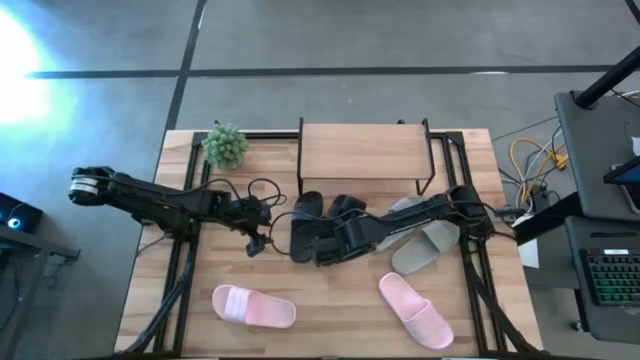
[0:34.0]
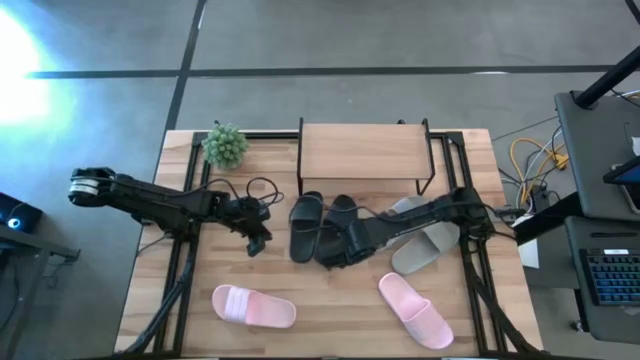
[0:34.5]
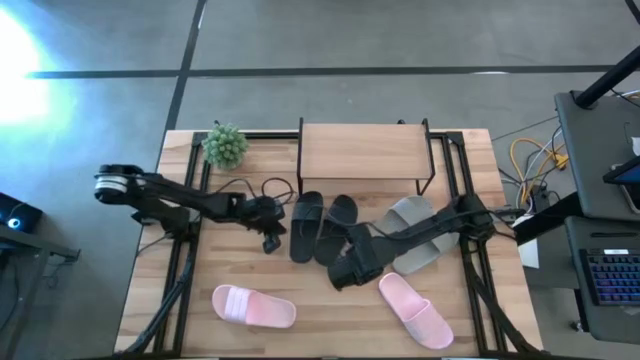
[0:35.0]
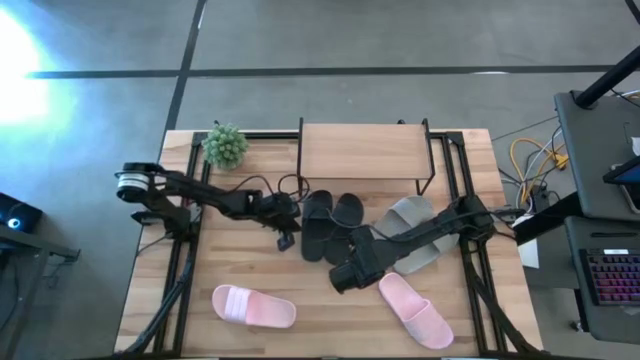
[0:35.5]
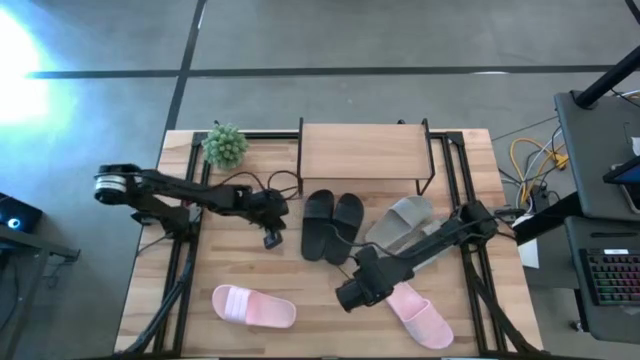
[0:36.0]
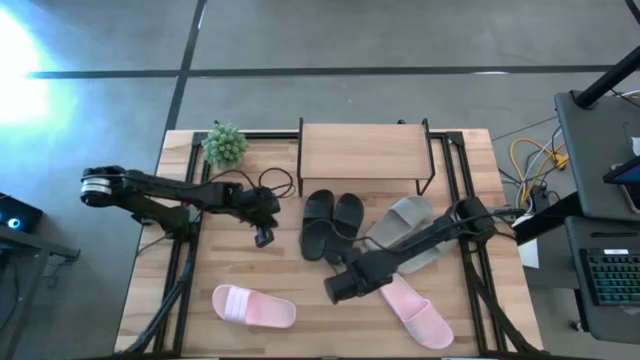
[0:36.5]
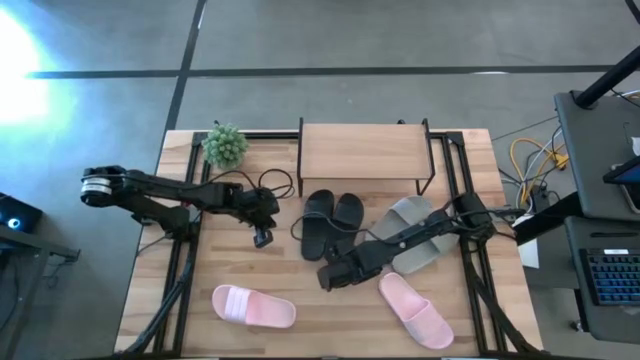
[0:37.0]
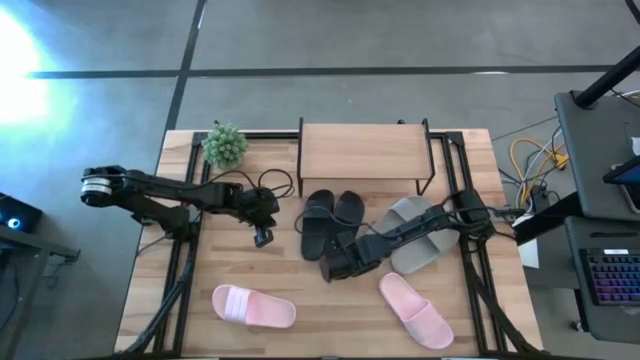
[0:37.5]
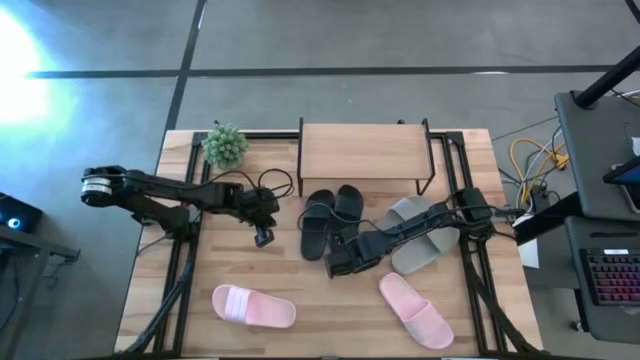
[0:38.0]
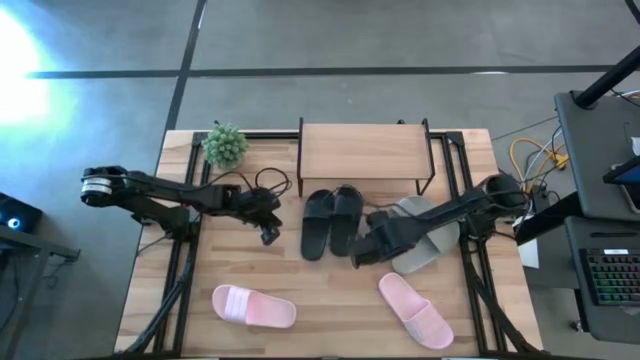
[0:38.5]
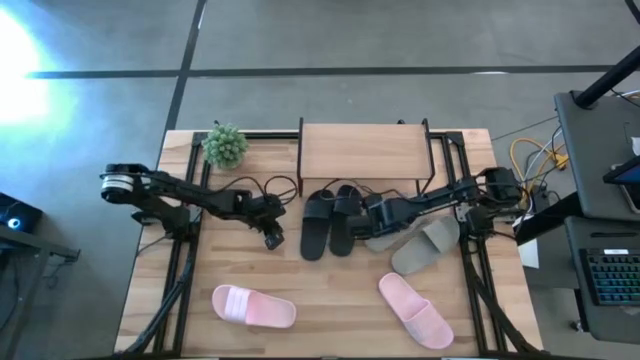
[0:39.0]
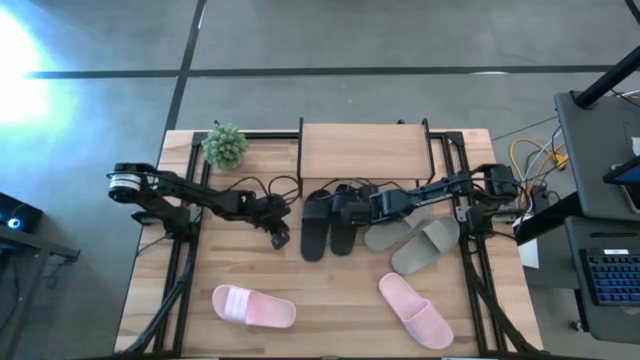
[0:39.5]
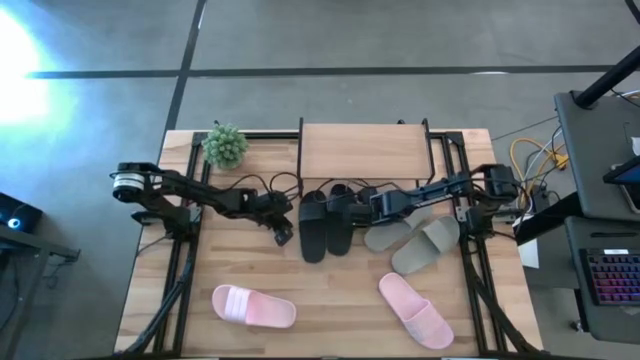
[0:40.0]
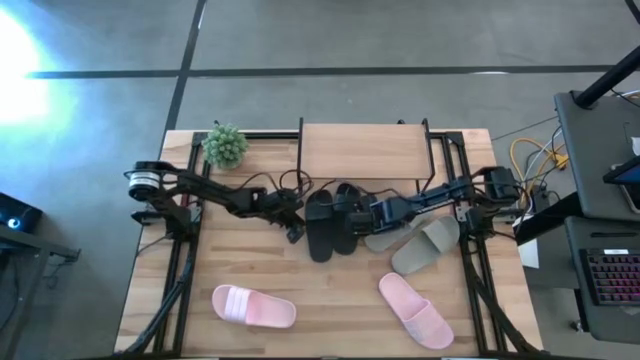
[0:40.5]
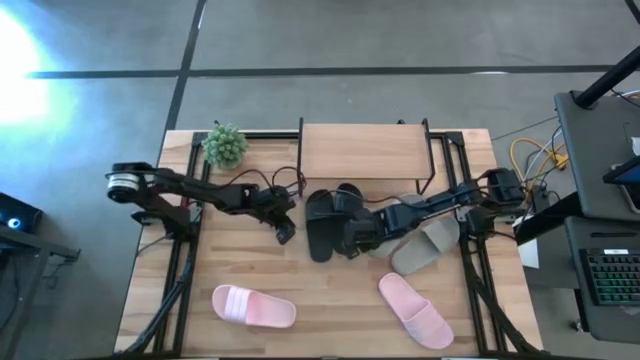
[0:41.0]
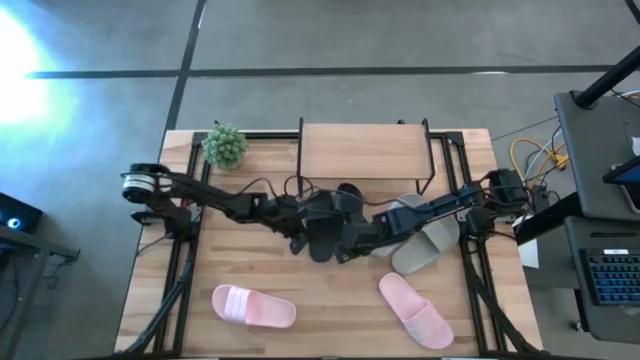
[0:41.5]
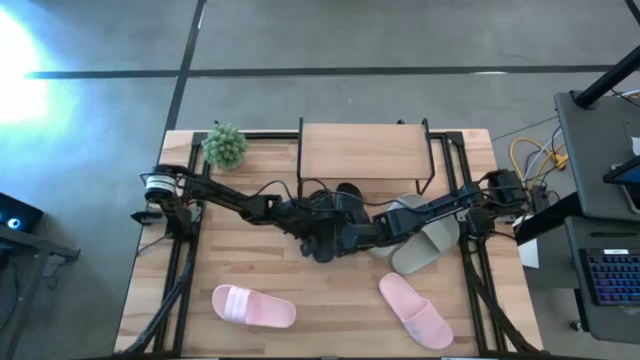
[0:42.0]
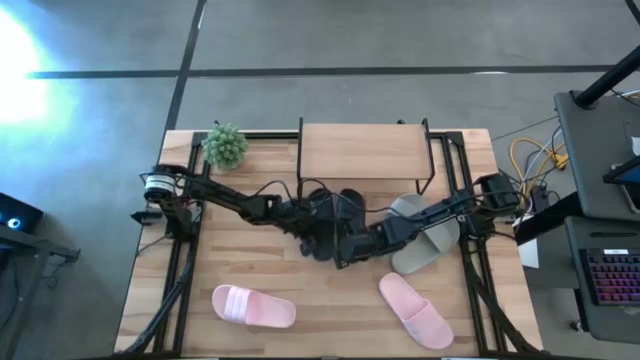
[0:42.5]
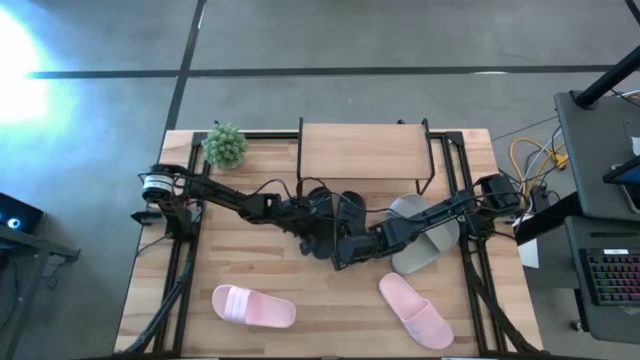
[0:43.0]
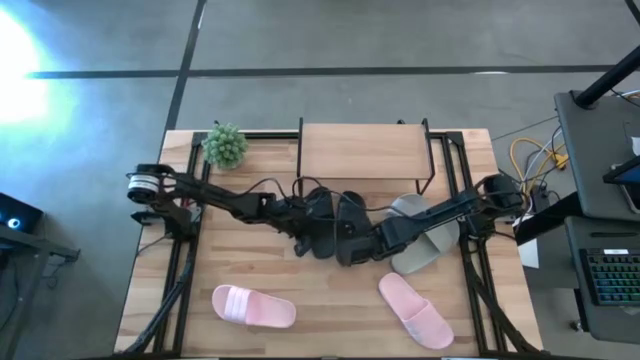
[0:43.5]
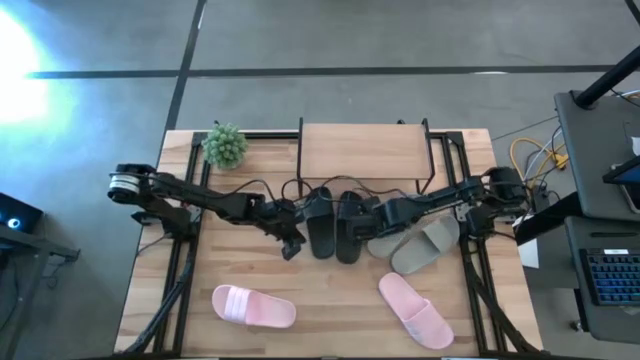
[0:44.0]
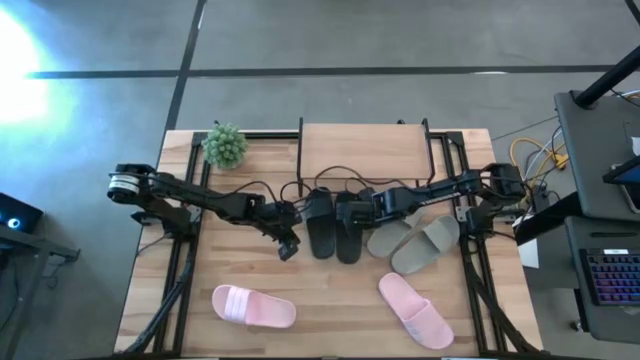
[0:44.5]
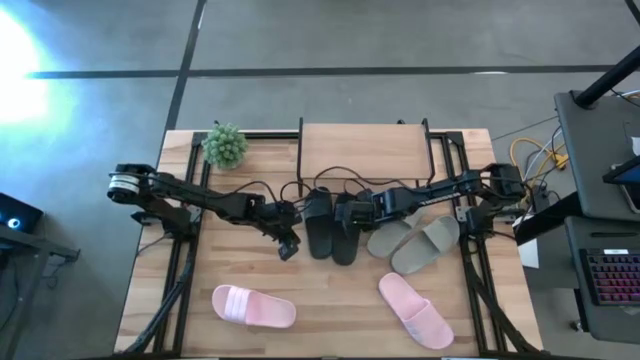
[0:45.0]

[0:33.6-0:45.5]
Task: Pick and place slides into the shelf
Adjust the black slippers

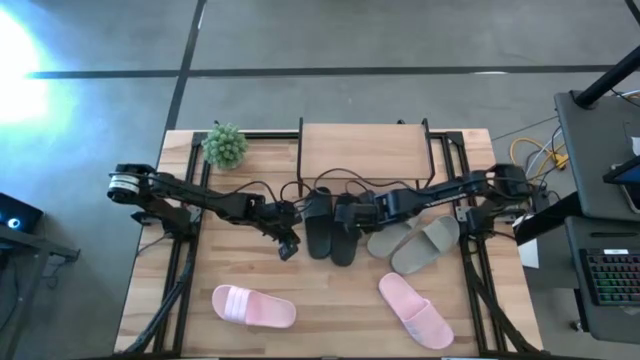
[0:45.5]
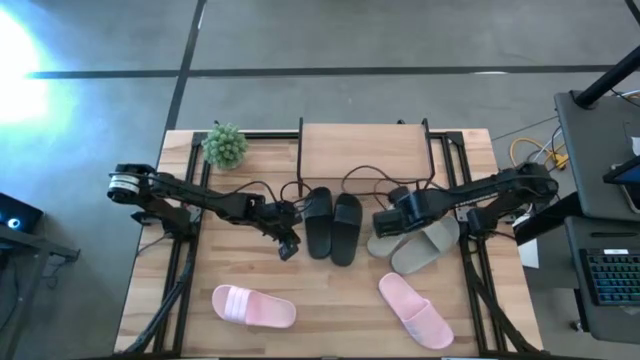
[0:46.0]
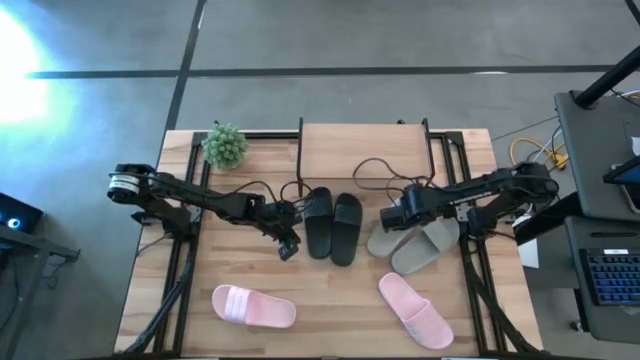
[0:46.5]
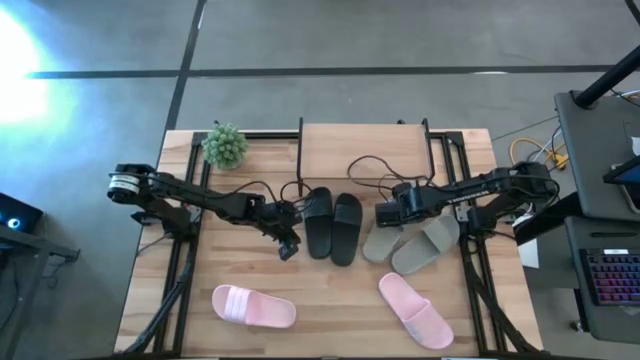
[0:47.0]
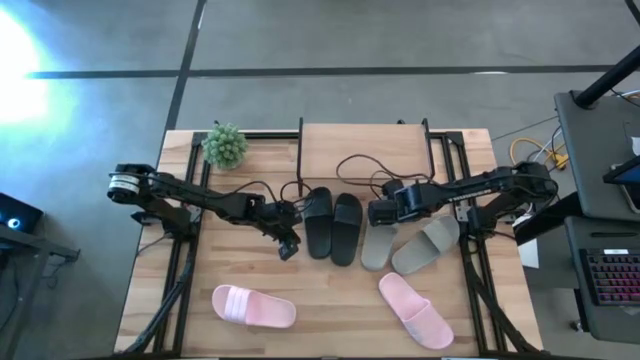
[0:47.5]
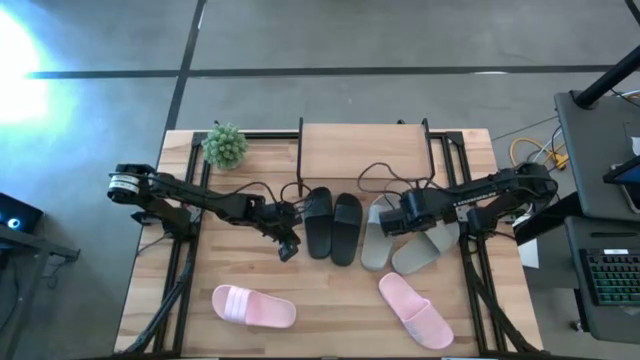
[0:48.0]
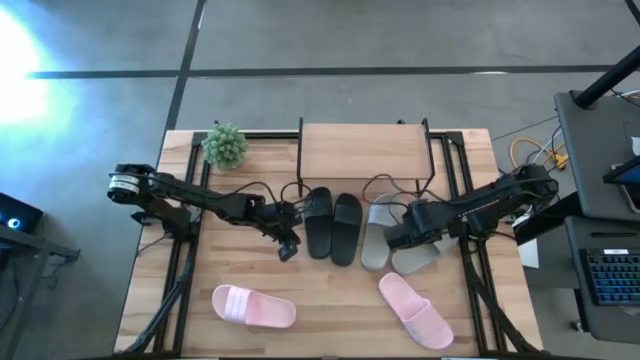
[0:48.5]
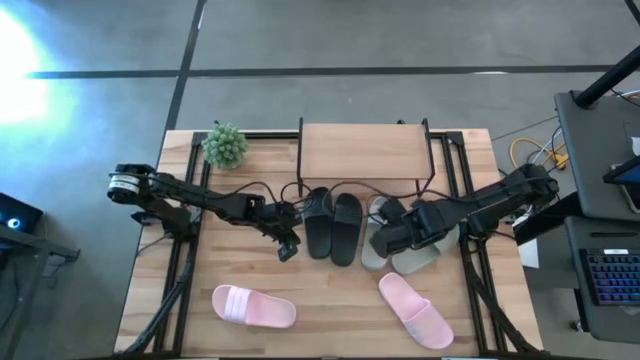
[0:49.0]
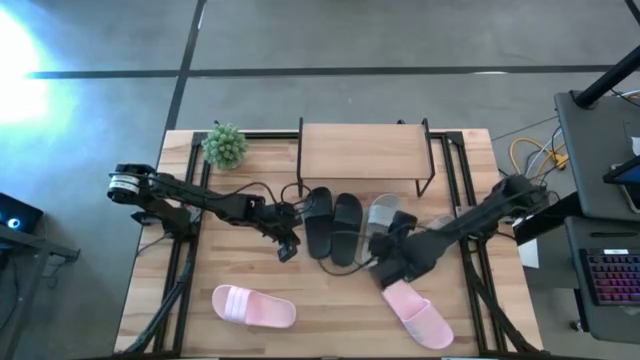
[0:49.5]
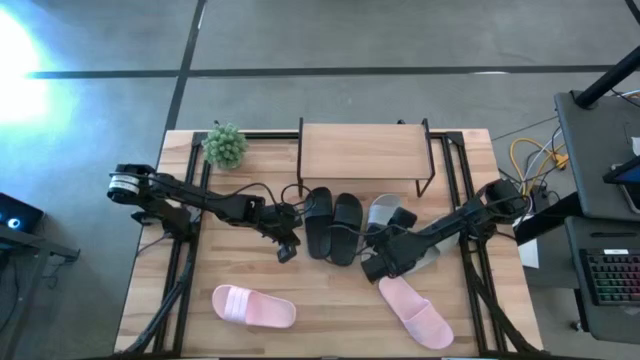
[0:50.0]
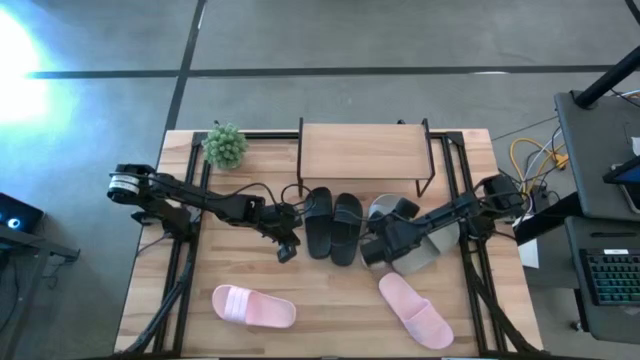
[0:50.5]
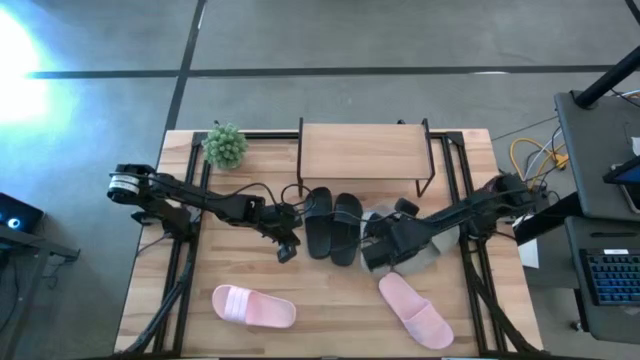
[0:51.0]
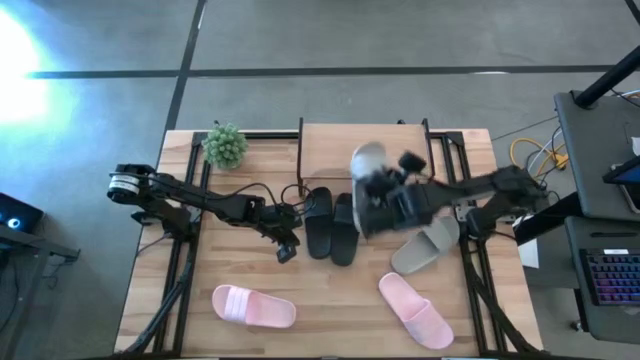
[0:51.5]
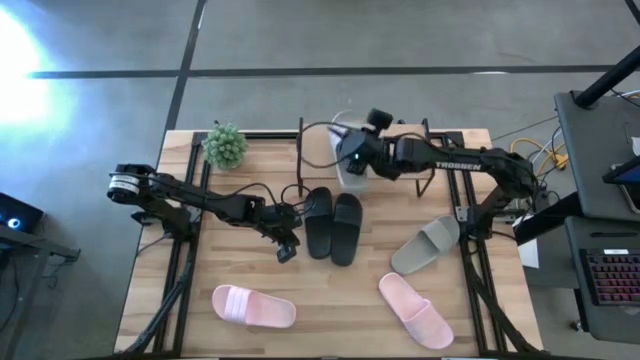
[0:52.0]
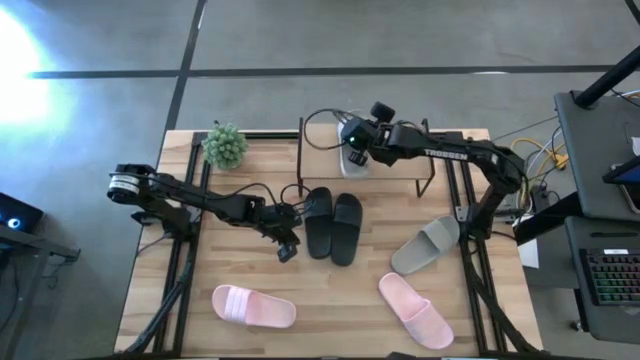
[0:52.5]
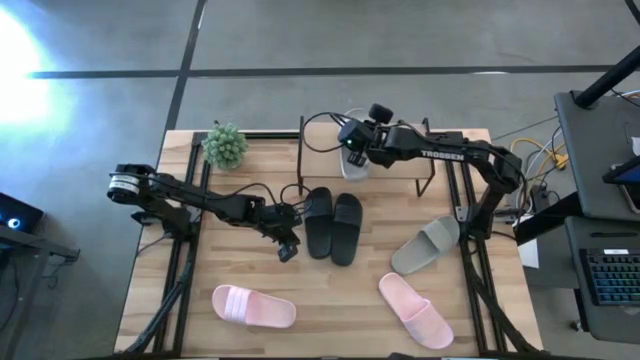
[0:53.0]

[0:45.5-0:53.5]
Put the left gray slipper on the shelf
